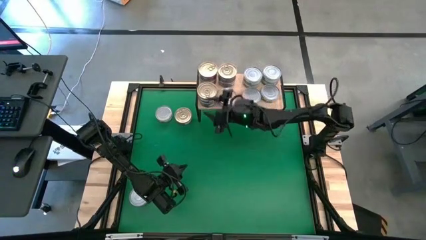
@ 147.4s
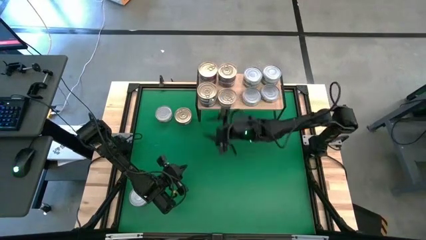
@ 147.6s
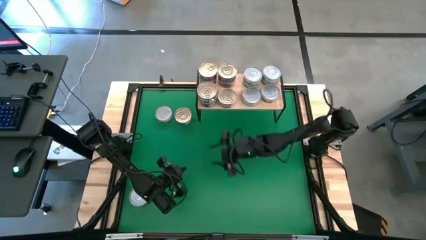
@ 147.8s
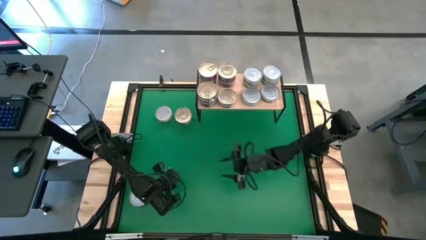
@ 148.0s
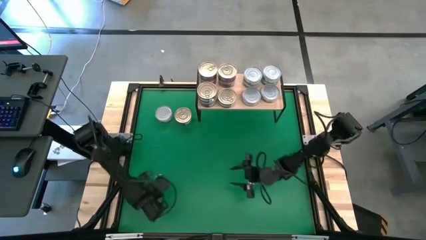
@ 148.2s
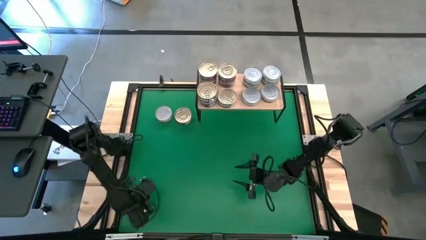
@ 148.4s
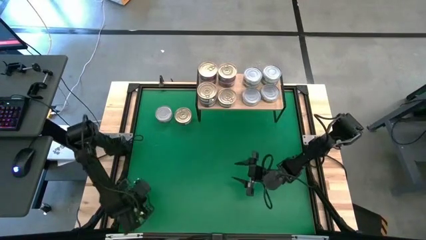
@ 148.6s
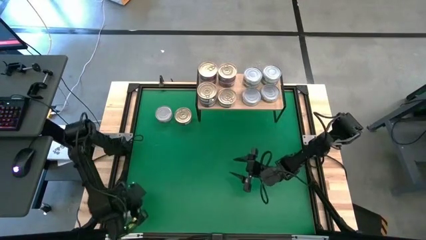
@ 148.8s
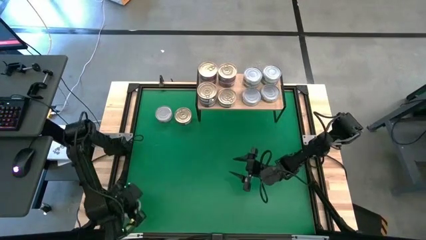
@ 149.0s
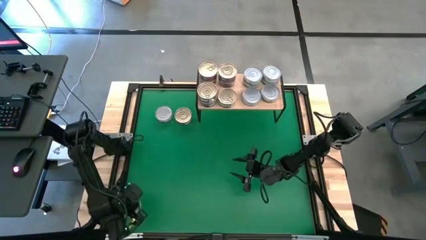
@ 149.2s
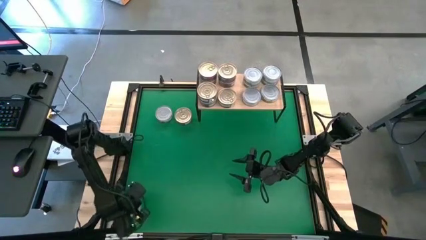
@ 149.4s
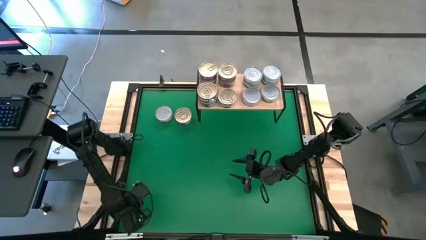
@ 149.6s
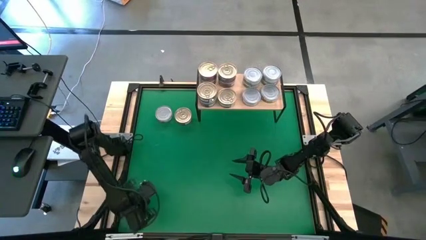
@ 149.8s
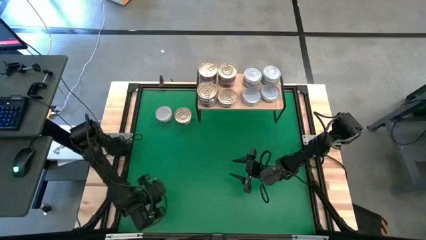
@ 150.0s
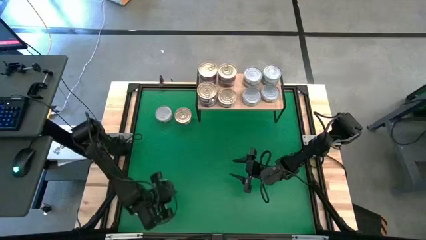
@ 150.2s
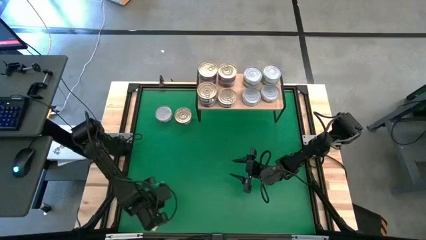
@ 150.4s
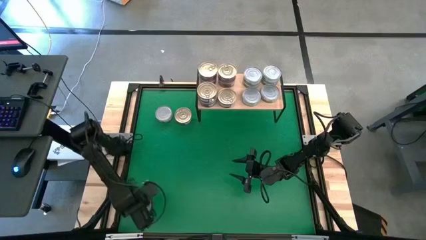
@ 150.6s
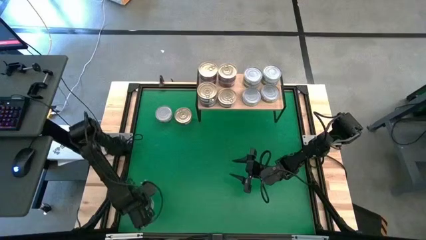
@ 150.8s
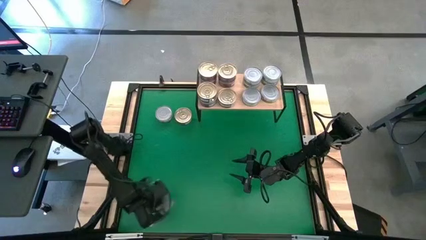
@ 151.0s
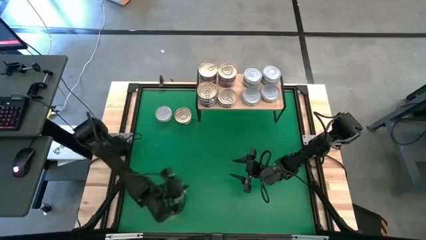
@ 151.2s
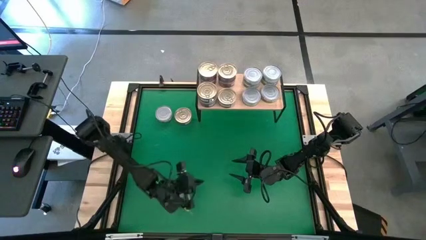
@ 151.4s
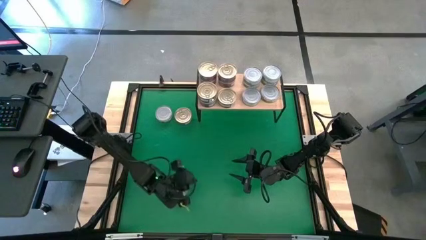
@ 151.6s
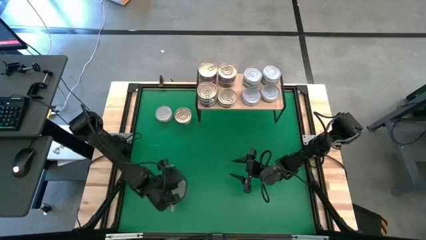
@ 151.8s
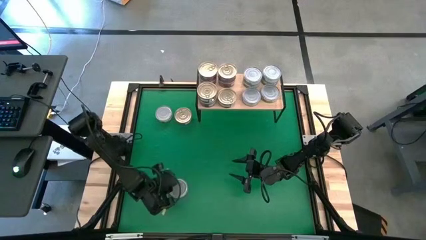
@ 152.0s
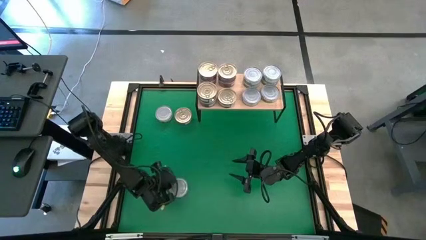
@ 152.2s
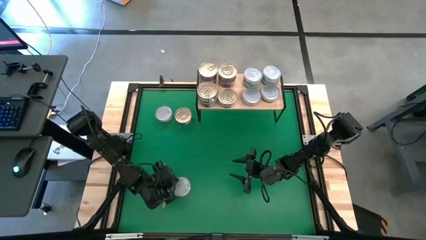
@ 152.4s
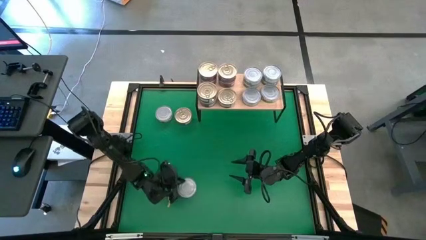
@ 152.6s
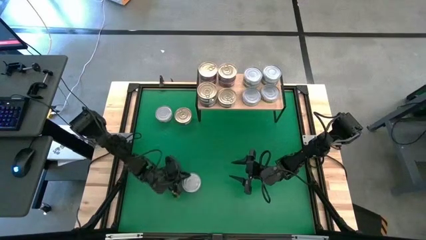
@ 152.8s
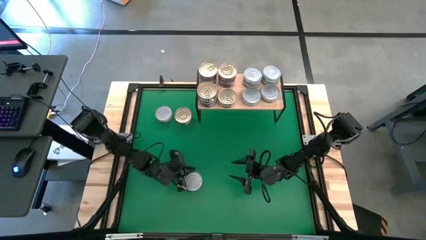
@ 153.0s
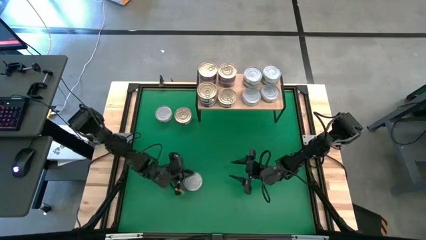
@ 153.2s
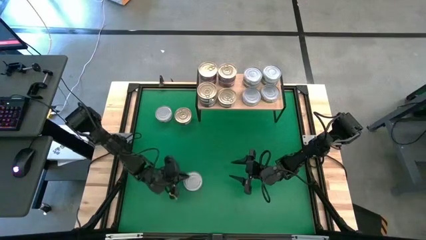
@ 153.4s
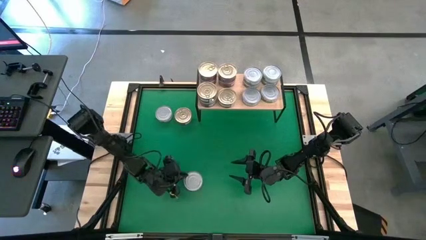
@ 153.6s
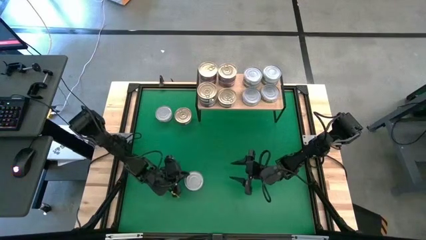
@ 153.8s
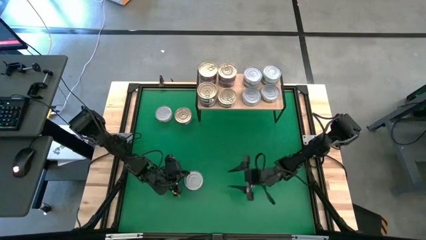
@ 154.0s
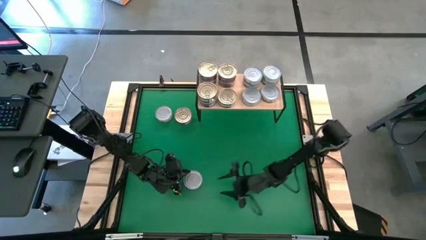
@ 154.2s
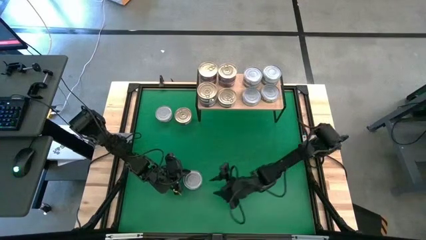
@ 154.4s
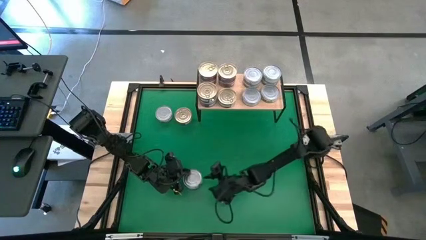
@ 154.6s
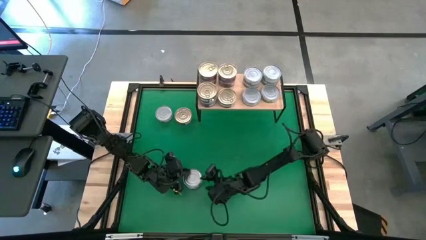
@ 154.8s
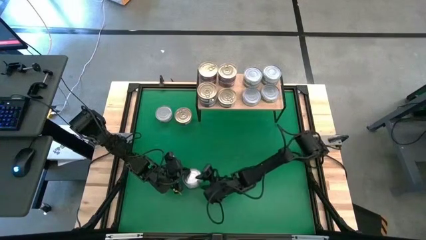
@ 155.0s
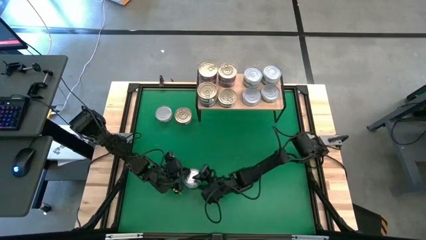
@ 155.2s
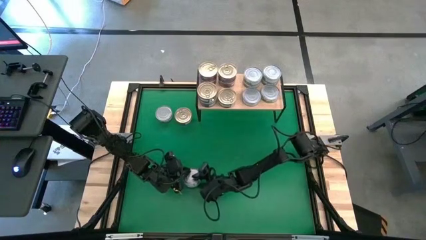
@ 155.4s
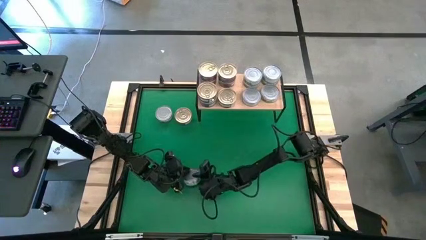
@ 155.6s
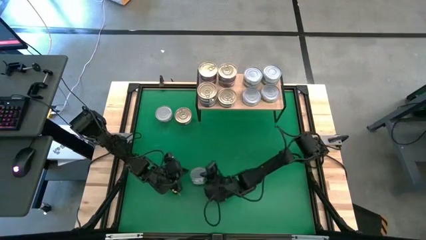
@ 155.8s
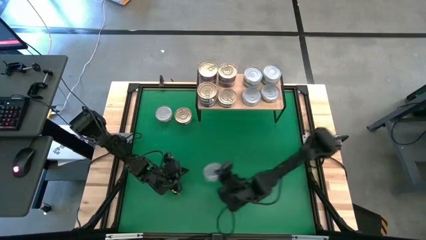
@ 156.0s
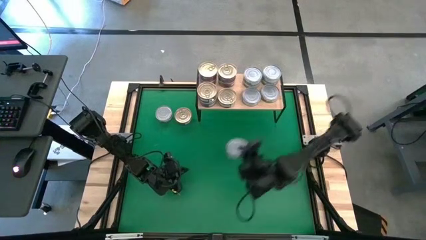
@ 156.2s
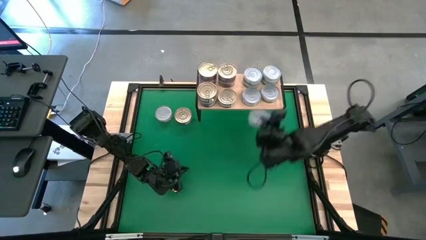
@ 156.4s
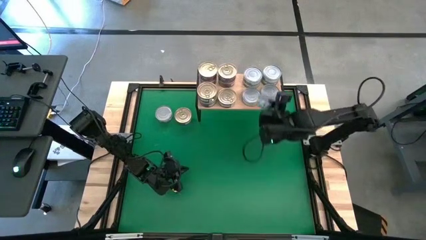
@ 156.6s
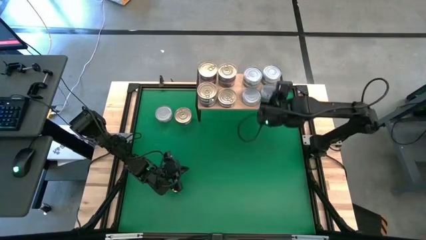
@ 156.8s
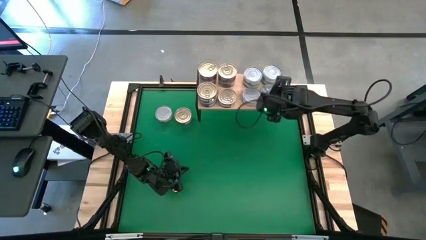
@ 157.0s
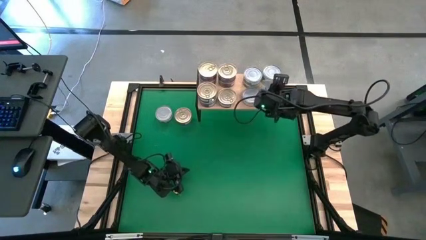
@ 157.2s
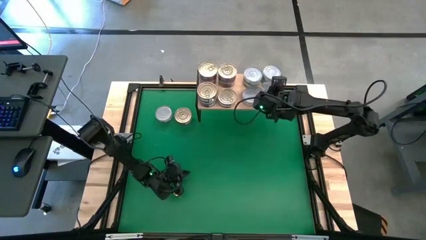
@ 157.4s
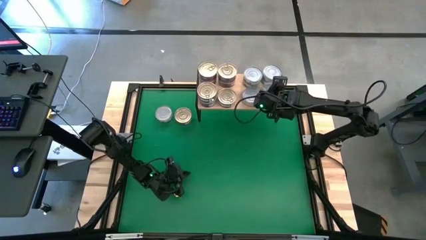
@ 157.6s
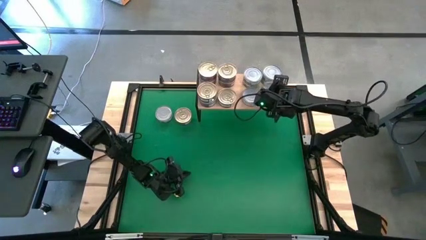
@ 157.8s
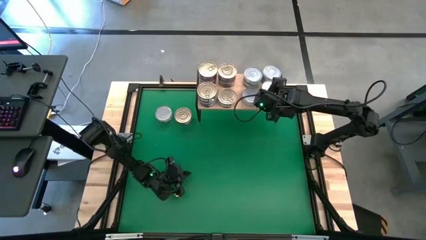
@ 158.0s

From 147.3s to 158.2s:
Task: Stack canned seafood by type on shelf
Stack the green tuna can on top of the bottom right green tuna can on the shelf

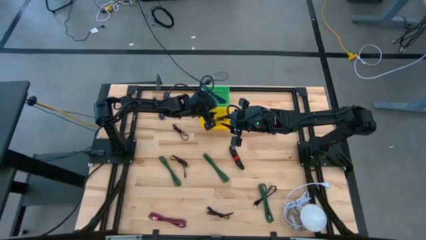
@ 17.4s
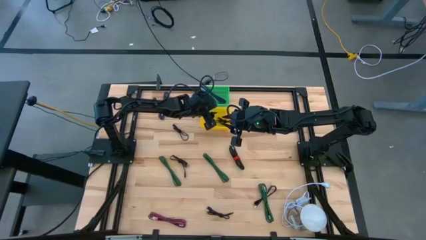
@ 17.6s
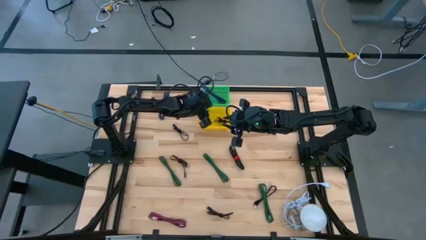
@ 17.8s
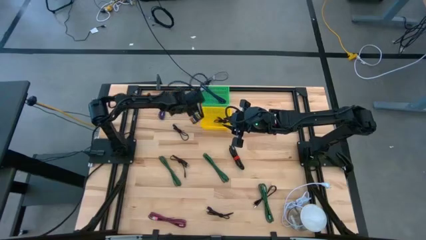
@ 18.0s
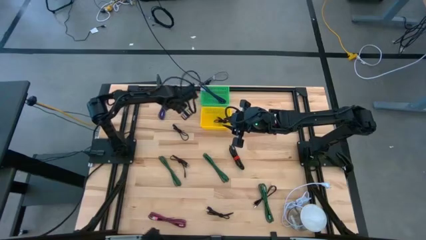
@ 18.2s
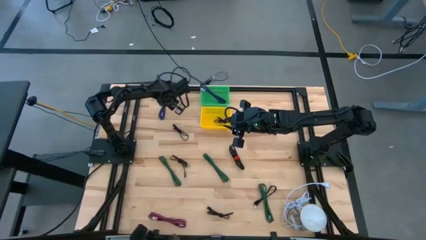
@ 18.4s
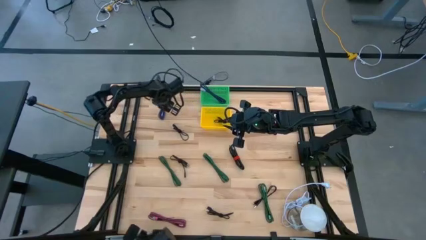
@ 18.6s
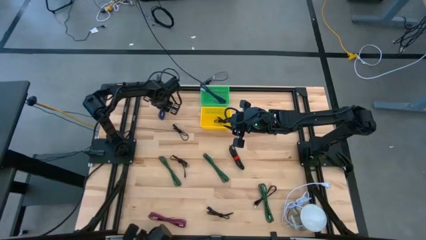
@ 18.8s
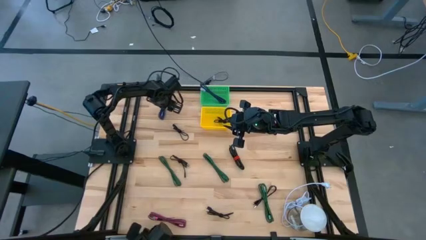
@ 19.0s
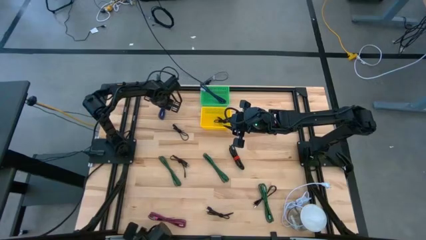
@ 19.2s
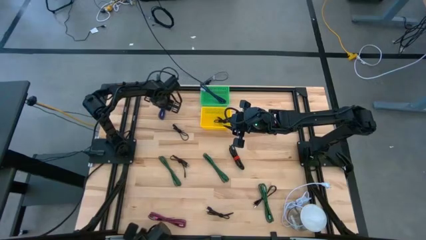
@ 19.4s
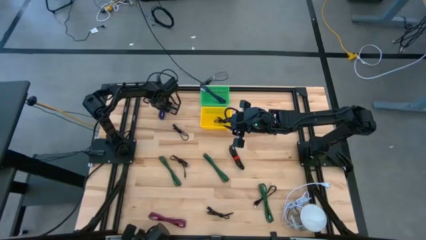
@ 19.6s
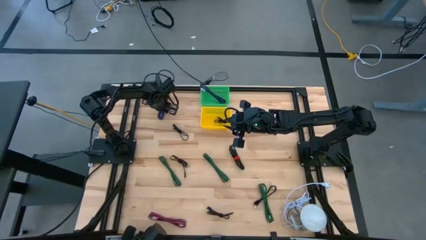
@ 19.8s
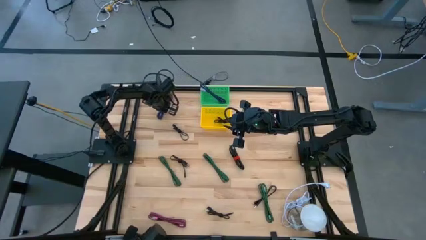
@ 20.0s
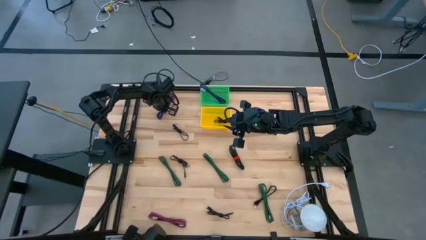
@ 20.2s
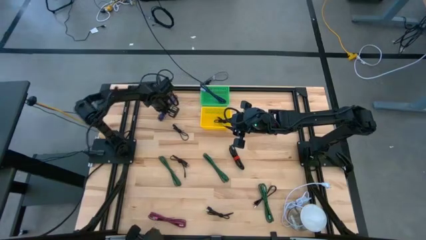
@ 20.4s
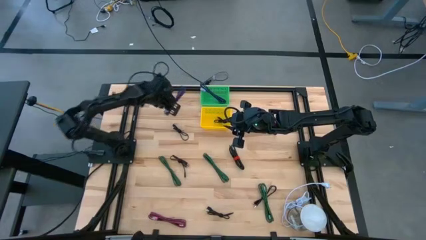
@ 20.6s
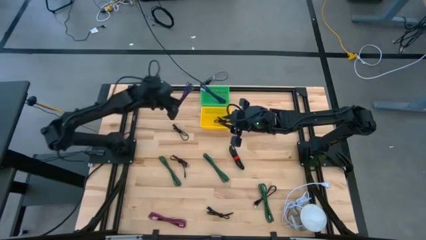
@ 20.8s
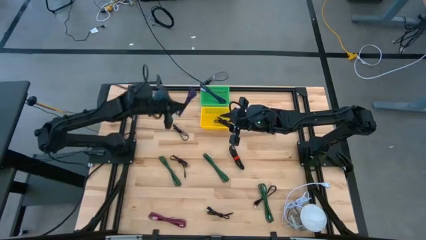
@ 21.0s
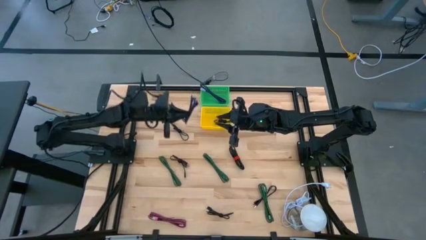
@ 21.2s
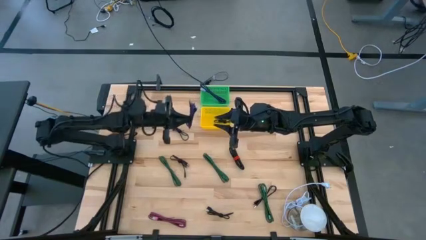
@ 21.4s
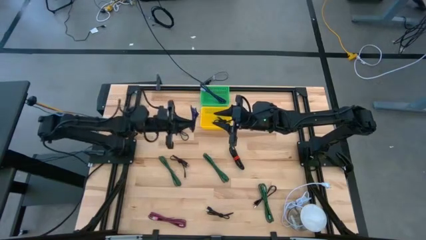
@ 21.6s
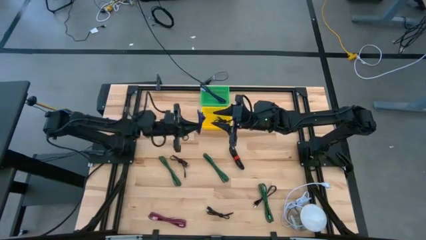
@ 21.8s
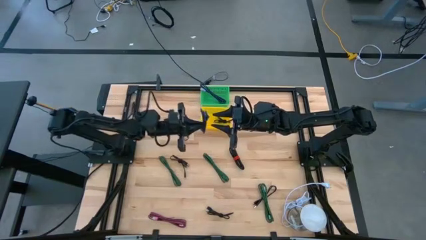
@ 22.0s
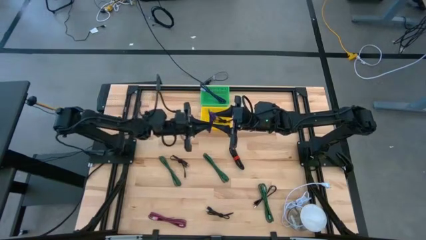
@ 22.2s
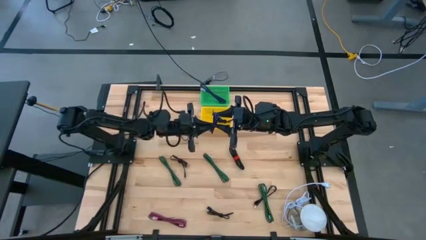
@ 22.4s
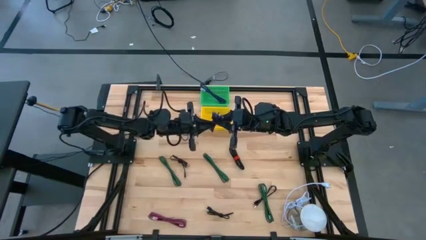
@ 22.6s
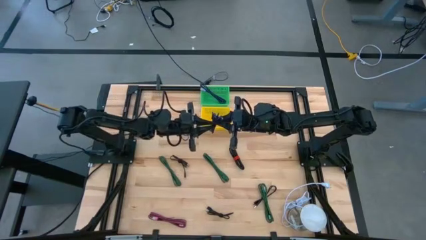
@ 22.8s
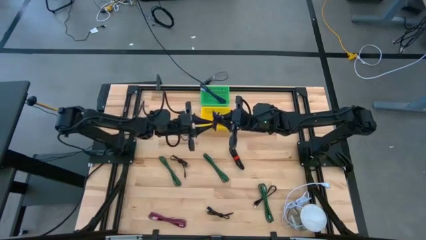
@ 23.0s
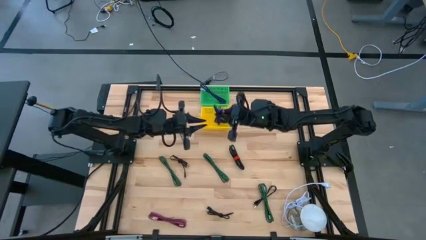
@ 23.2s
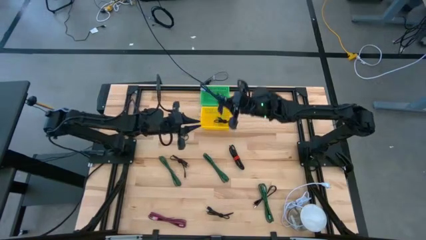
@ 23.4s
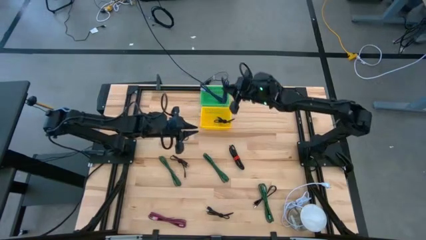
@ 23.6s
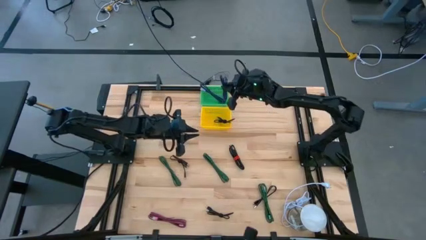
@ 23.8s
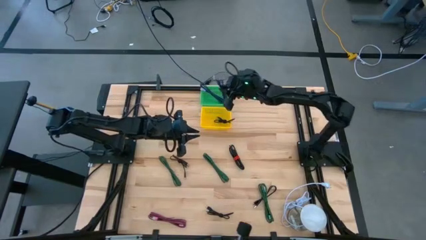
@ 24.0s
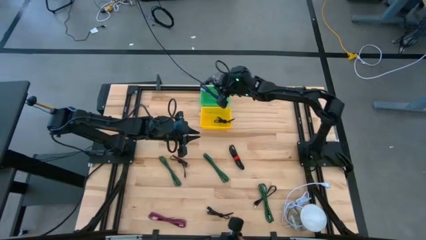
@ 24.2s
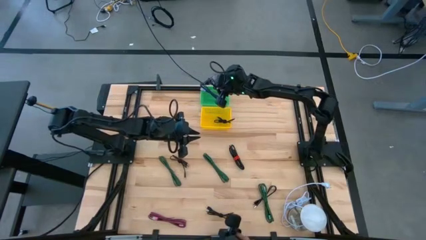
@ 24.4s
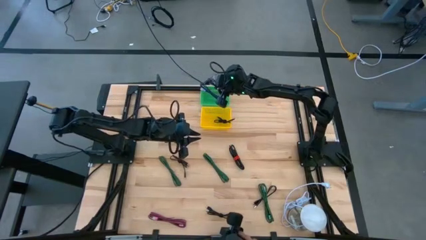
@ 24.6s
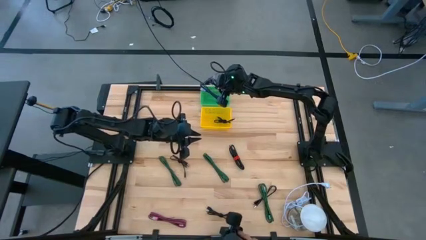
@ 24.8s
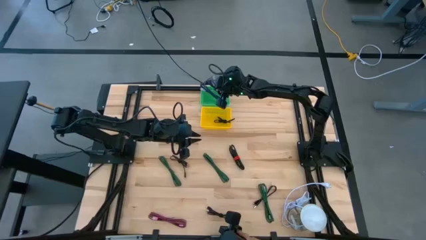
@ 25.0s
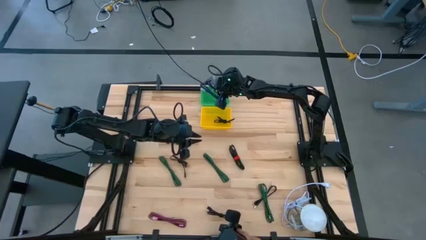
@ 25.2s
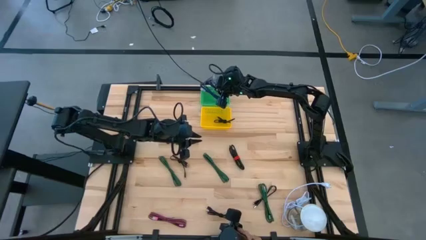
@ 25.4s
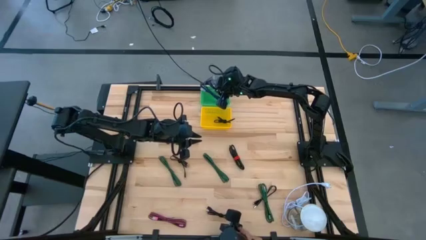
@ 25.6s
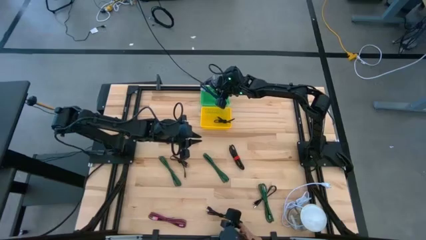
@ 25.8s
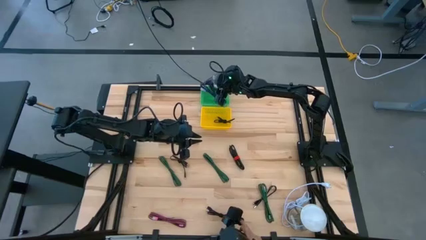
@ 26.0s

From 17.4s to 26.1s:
Task: Pick & Place USB Port
Put the purple charger cable into the green basket
